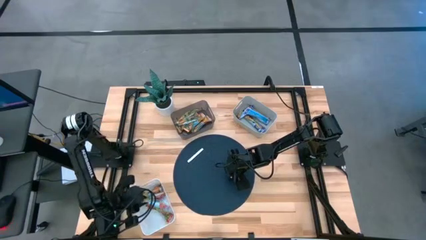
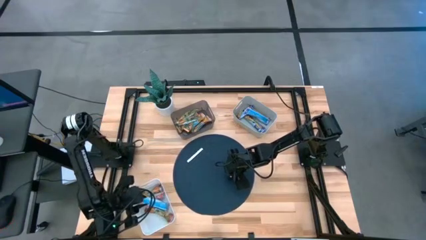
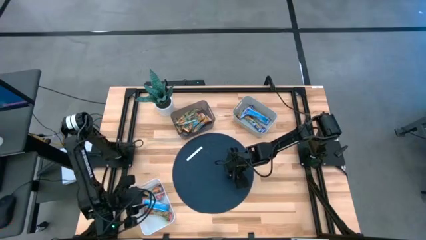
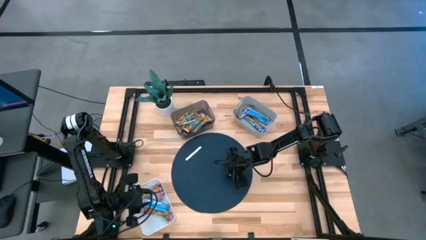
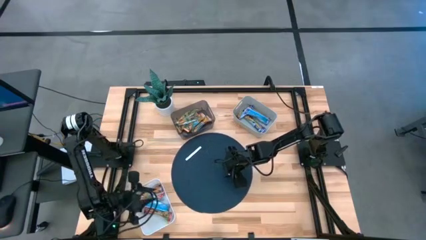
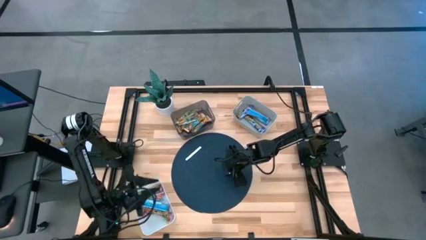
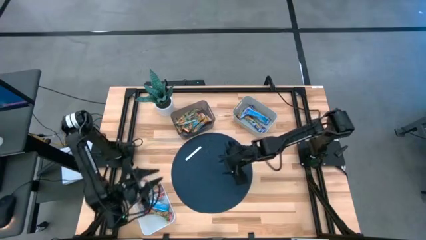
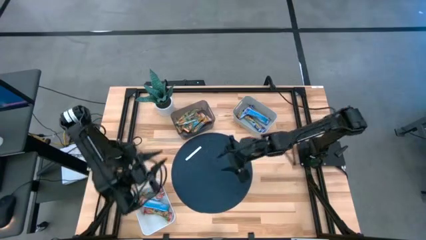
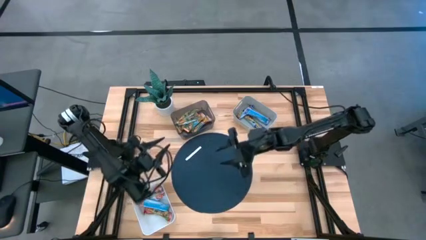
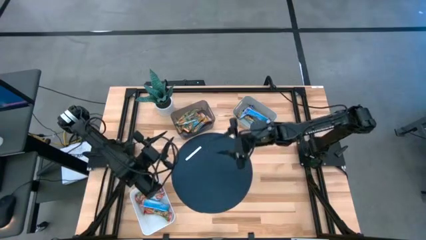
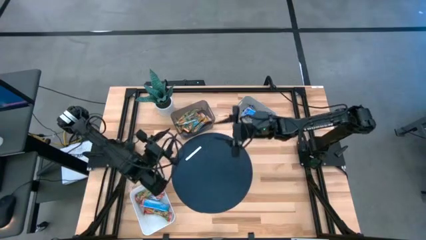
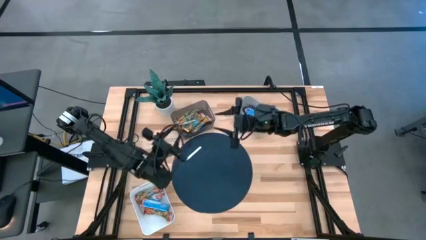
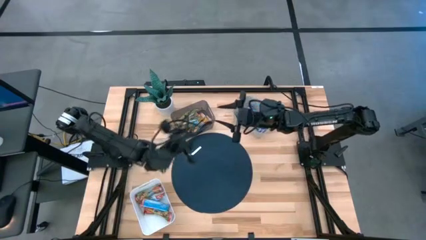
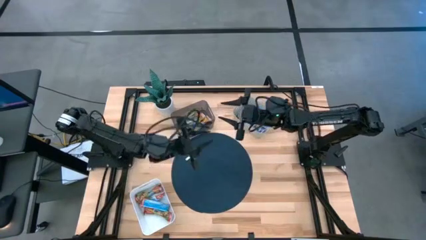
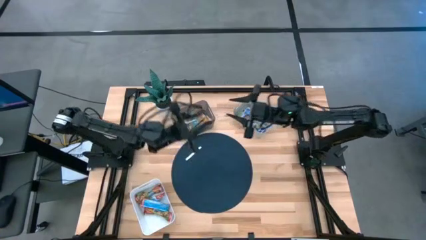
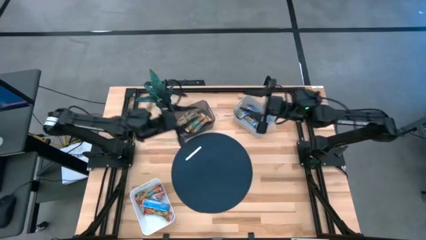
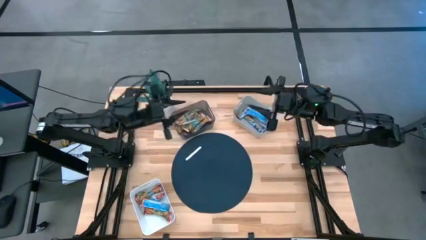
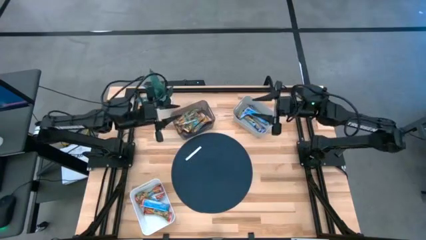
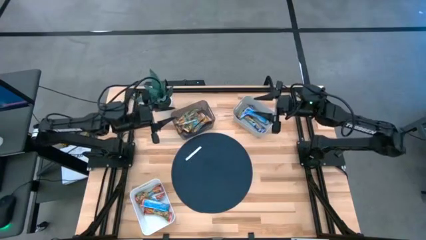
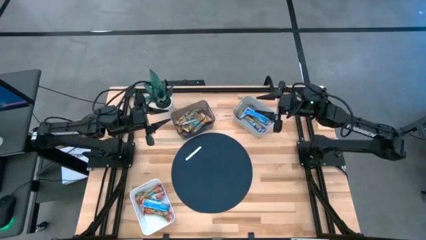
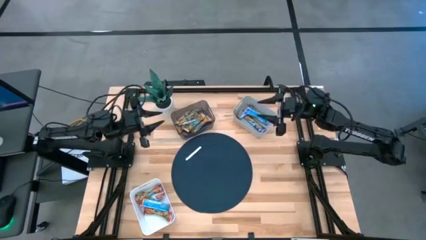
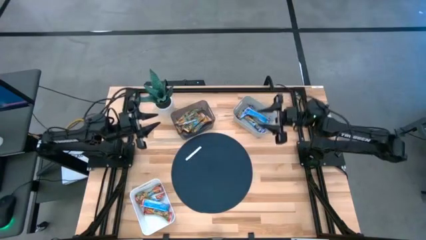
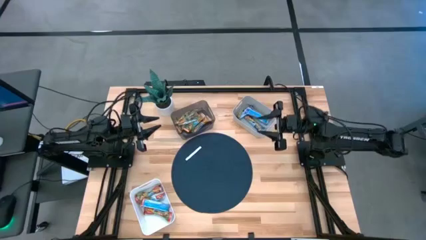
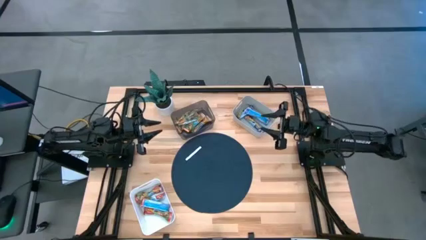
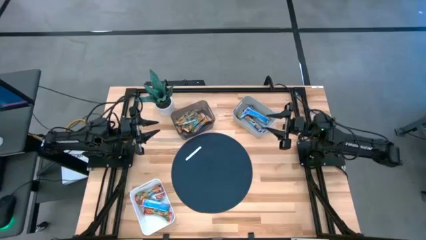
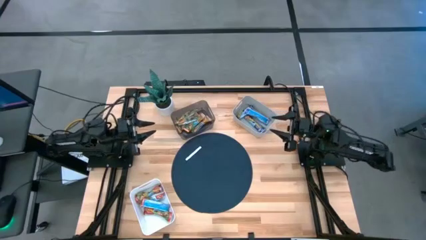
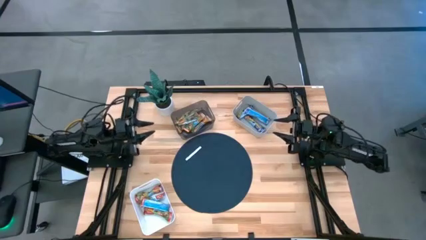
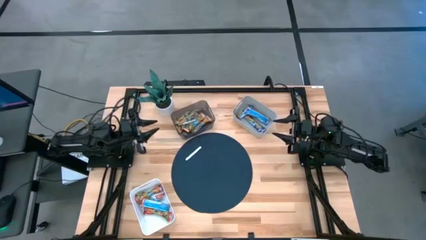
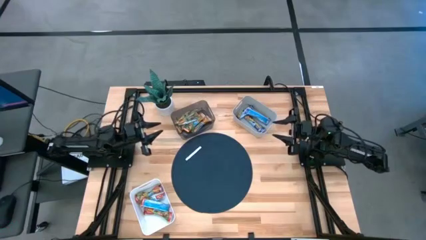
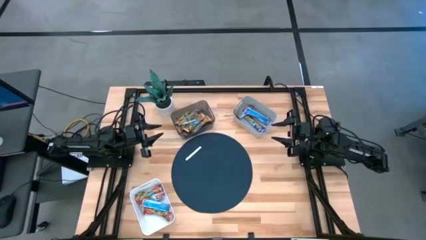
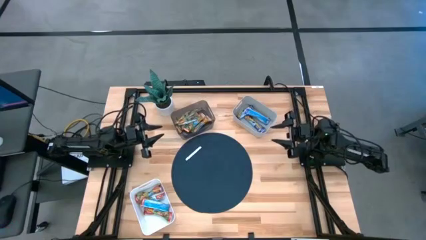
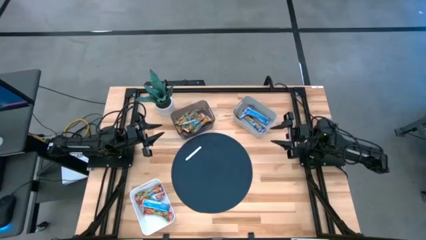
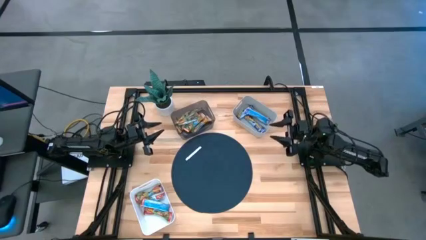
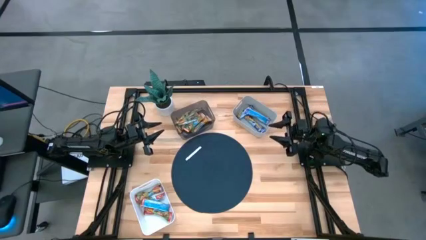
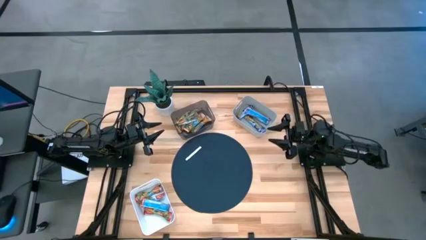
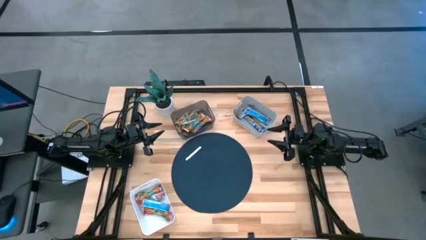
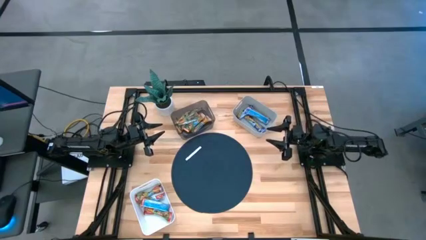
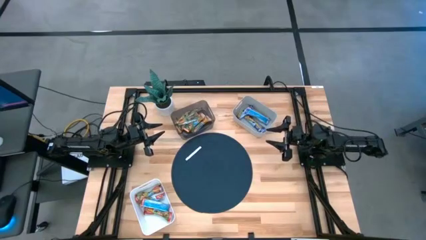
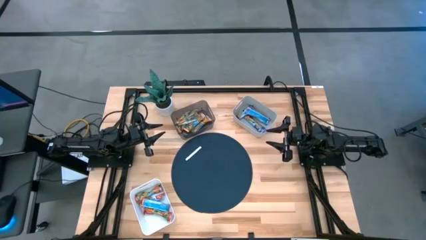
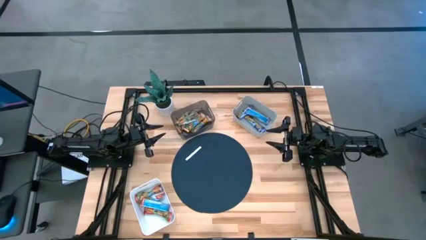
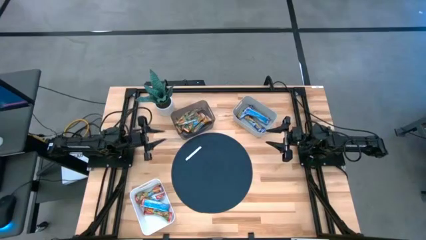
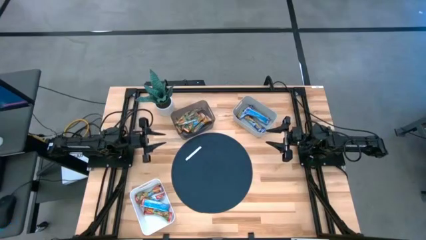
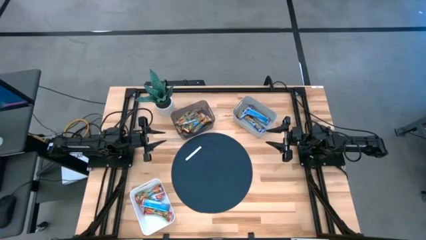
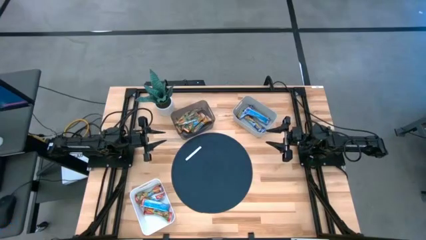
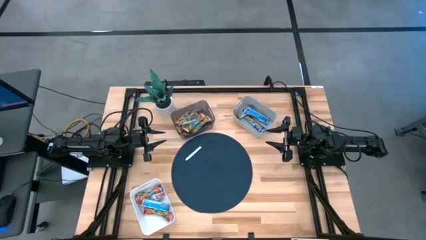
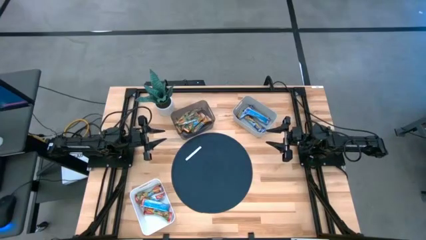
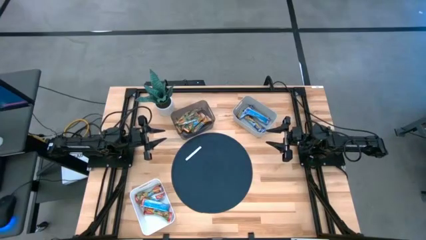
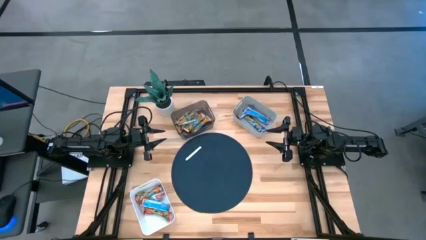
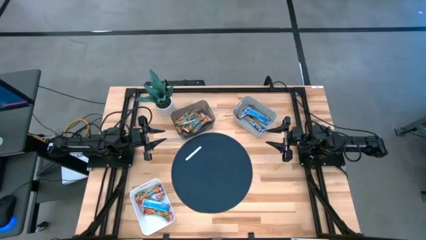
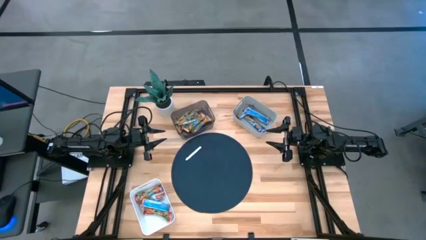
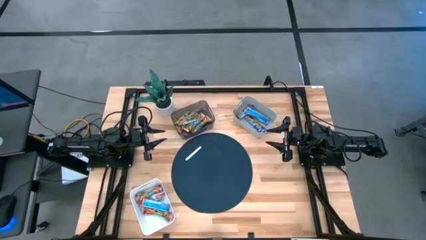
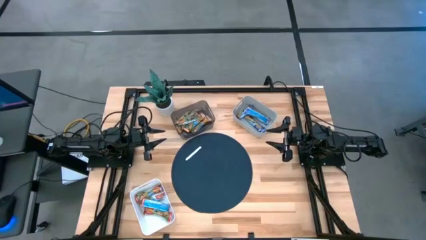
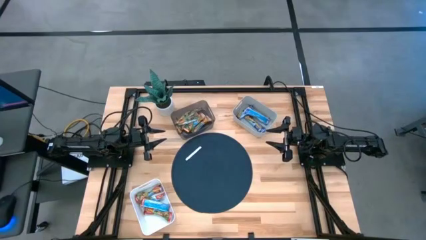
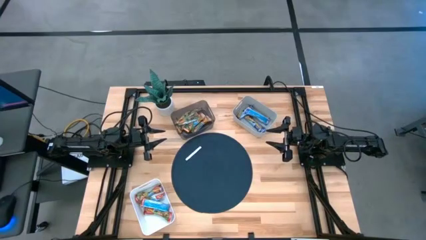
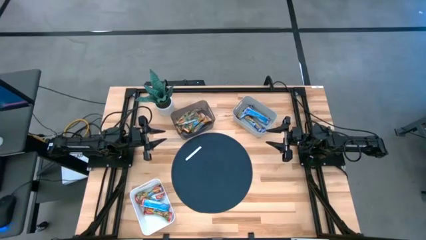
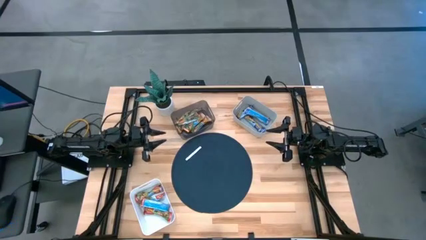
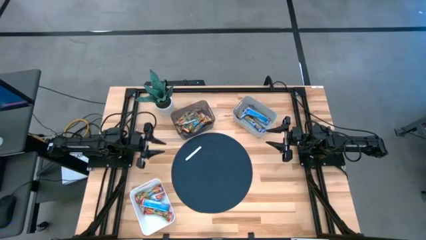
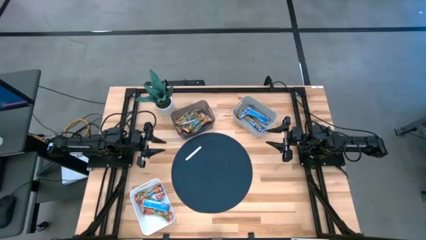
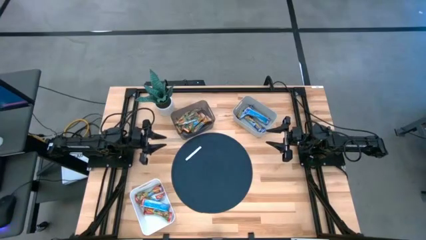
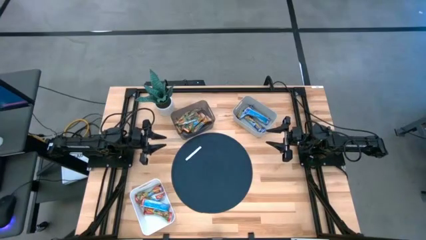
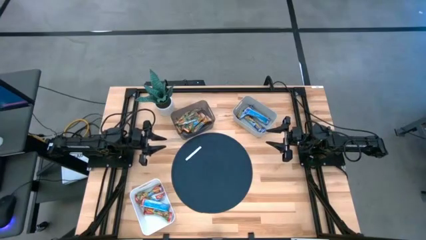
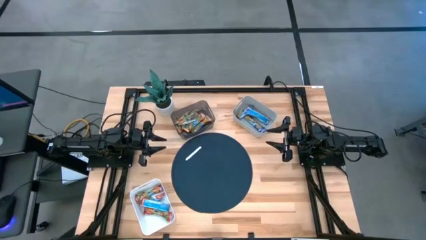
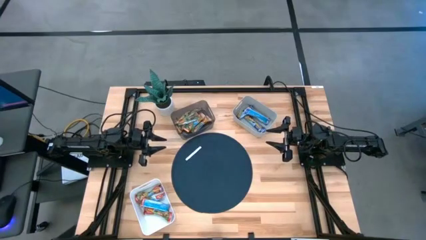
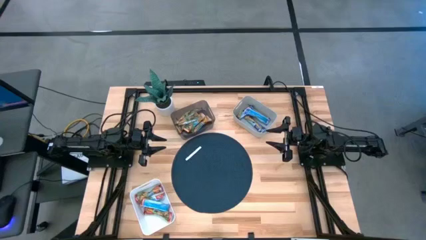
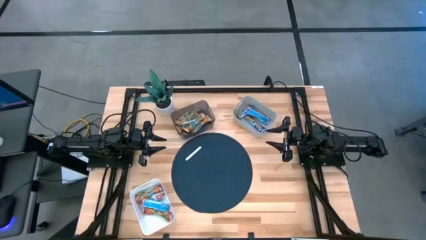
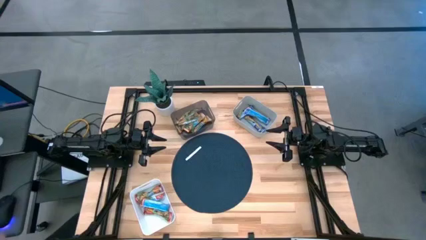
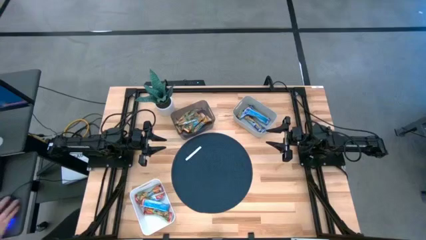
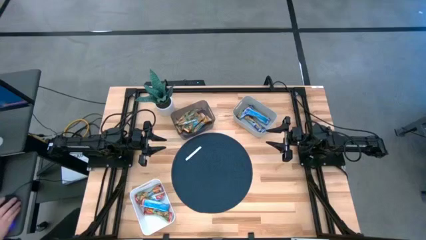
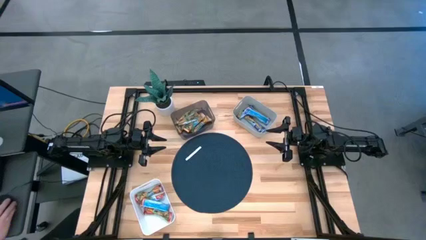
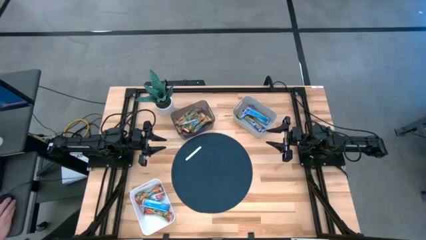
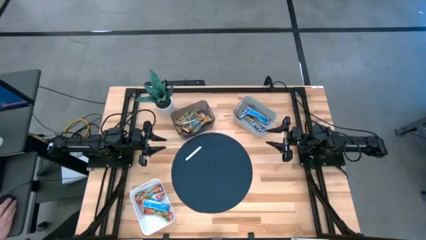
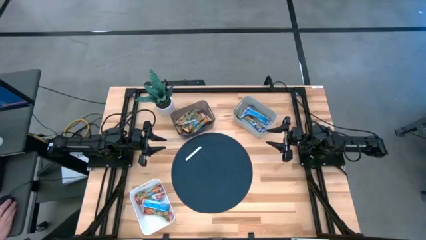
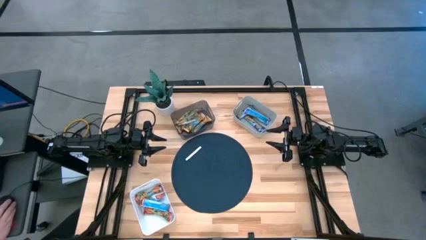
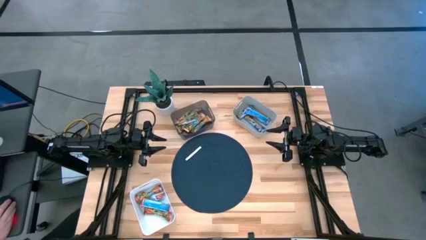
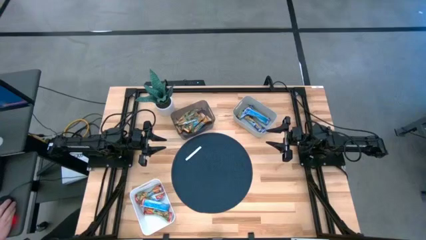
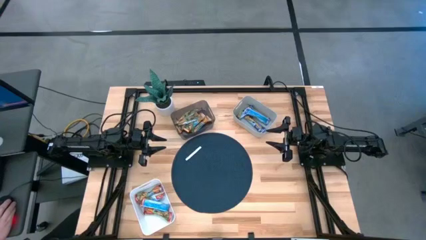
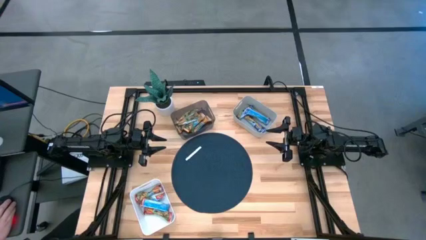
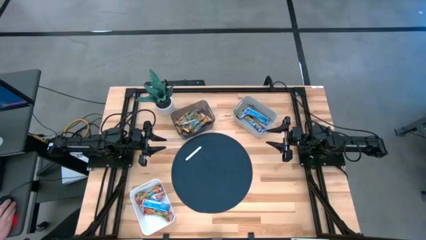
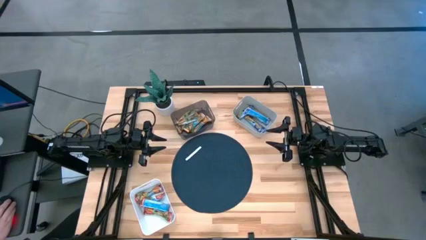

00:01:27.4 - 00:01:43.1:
Task: Pick and place Granola Bars by type
Return to Home Position

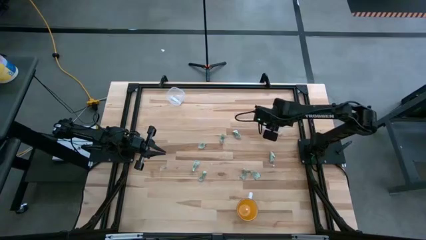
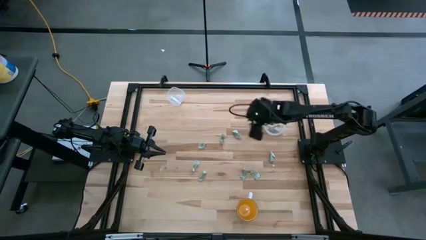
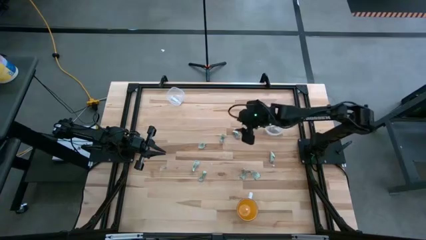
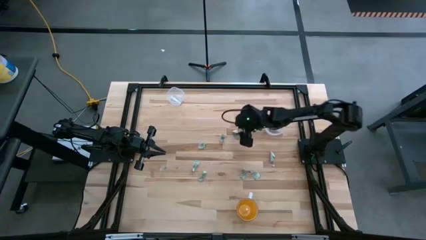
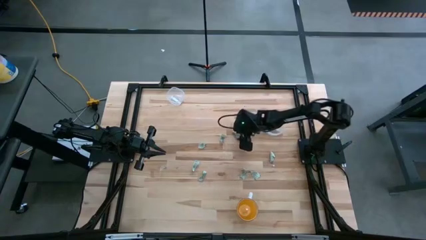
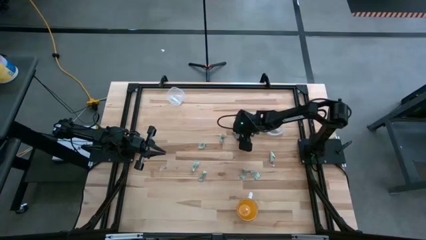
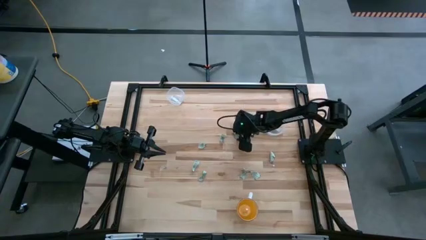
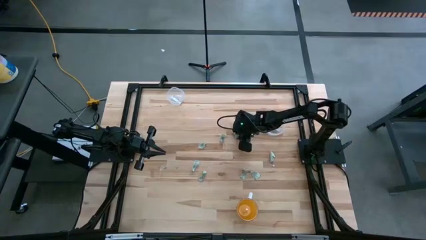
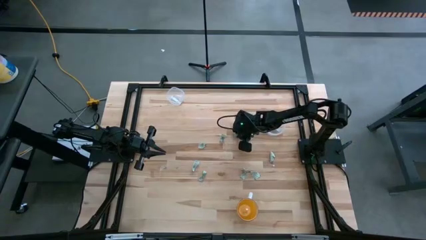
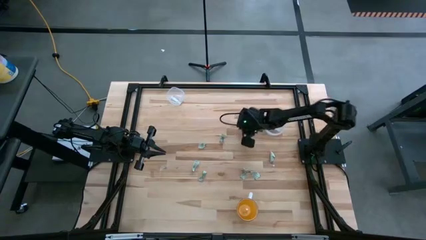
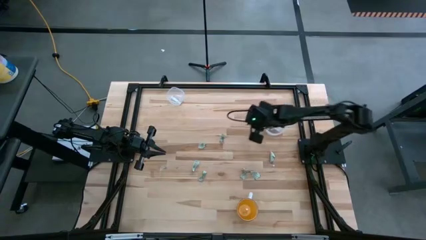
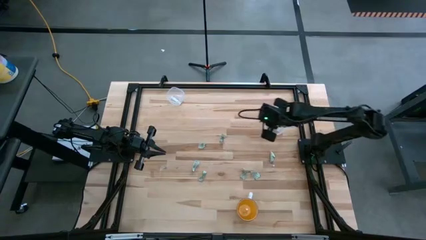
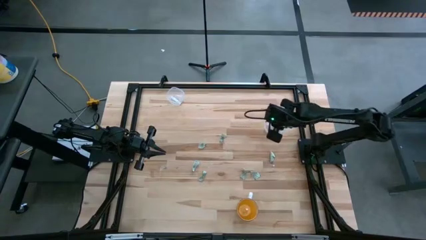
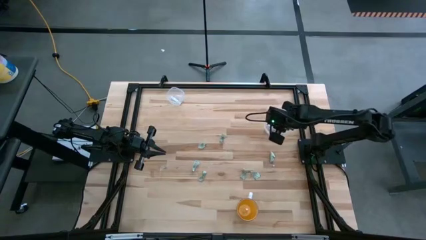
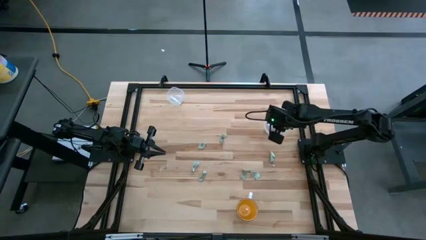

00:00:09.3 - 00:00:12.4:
Task: Pick and place items into bin
Put the stevia packet into the bottom transparent bin
